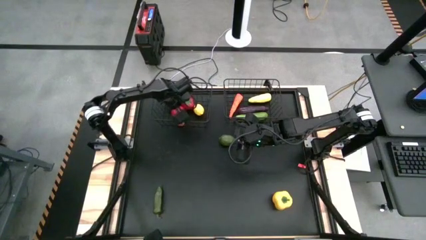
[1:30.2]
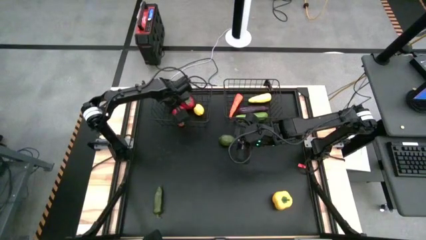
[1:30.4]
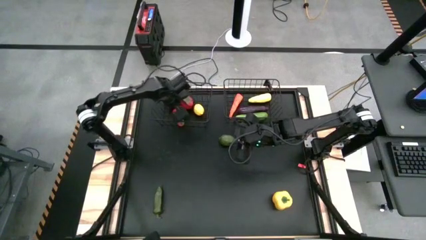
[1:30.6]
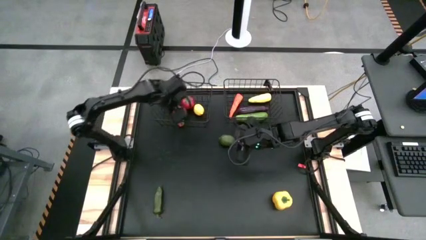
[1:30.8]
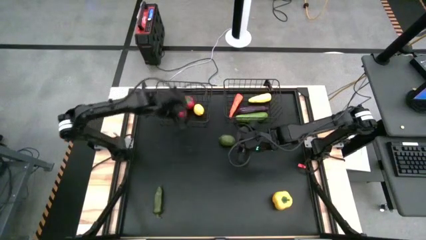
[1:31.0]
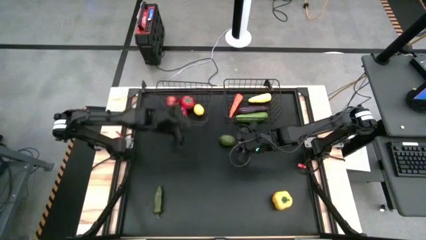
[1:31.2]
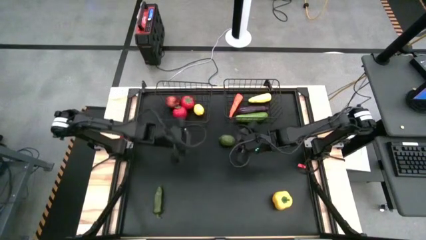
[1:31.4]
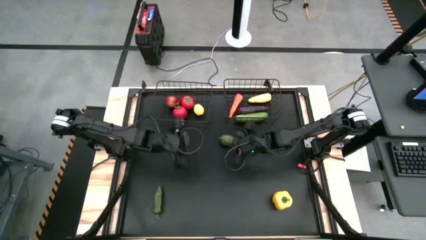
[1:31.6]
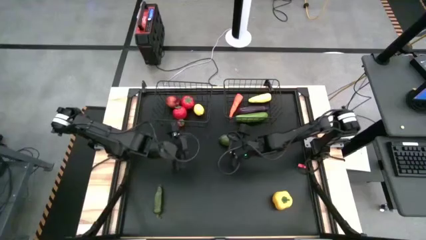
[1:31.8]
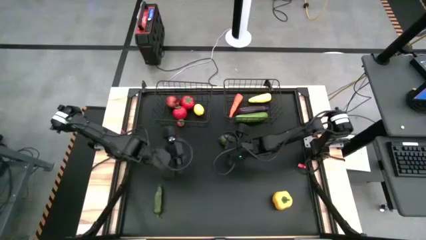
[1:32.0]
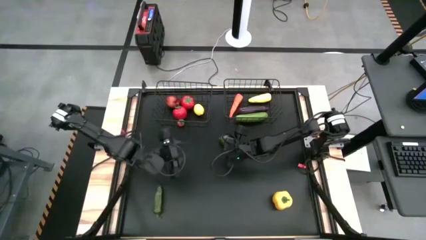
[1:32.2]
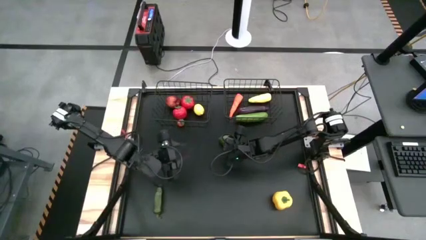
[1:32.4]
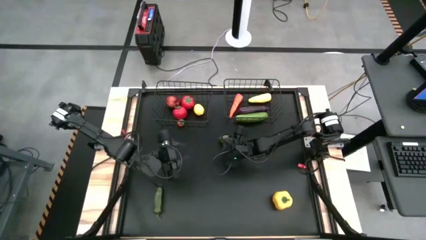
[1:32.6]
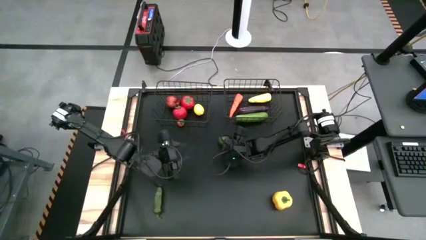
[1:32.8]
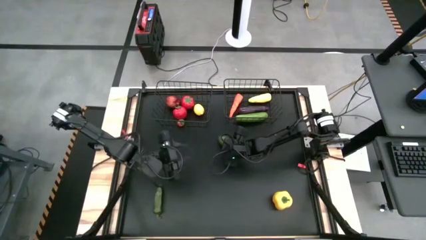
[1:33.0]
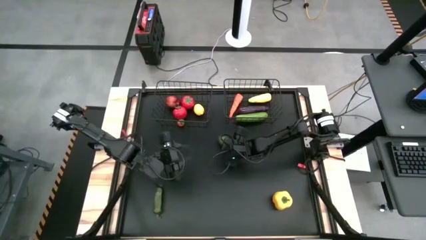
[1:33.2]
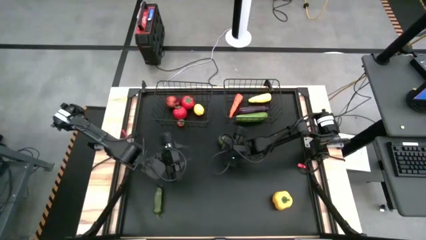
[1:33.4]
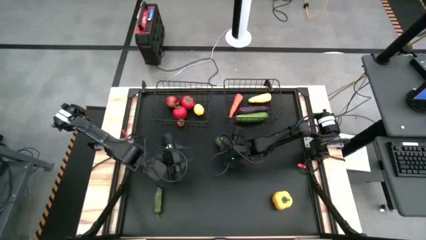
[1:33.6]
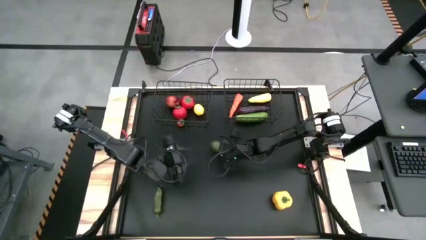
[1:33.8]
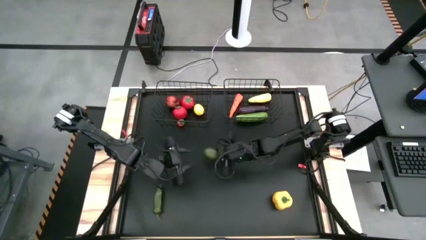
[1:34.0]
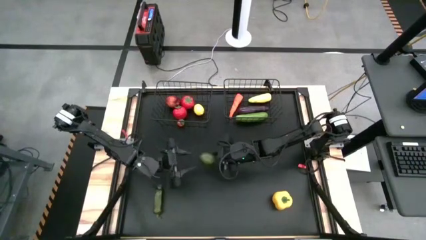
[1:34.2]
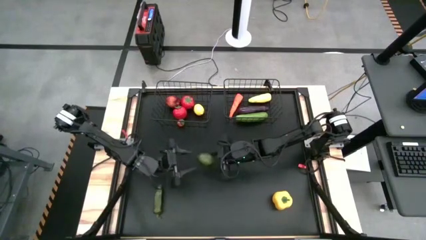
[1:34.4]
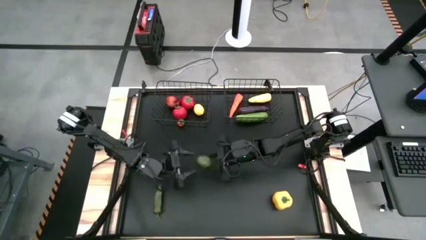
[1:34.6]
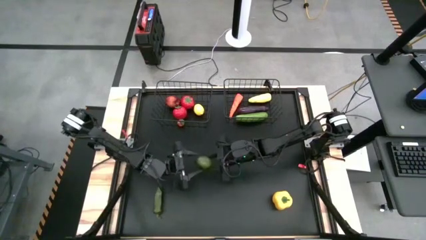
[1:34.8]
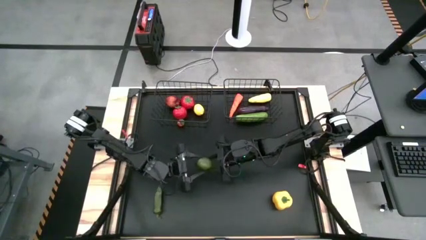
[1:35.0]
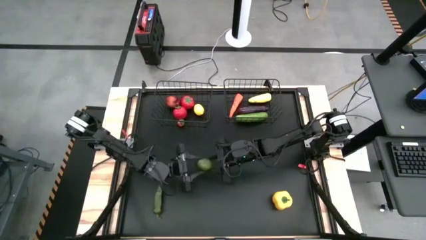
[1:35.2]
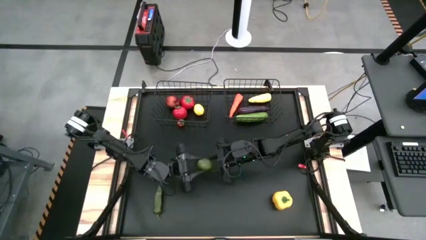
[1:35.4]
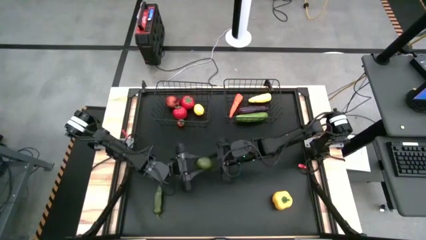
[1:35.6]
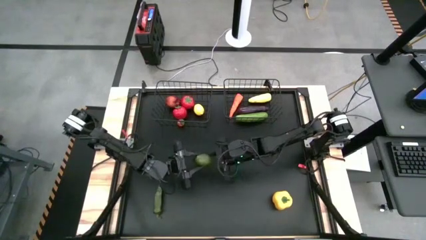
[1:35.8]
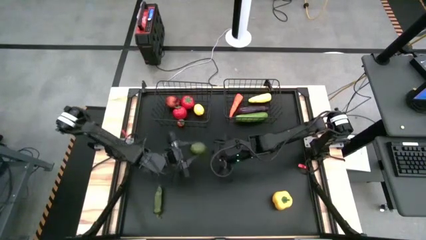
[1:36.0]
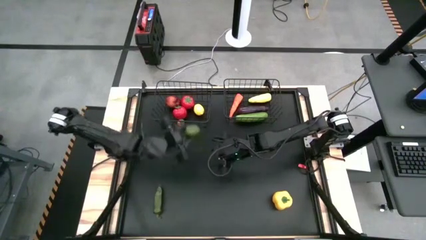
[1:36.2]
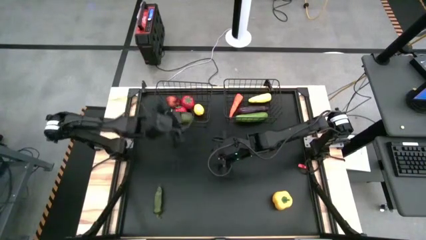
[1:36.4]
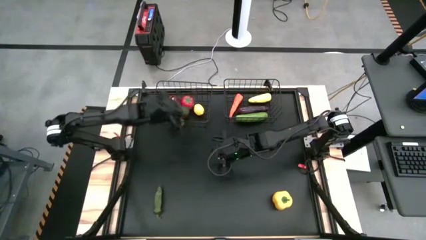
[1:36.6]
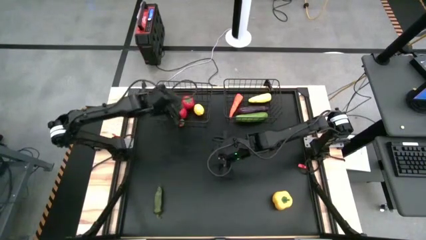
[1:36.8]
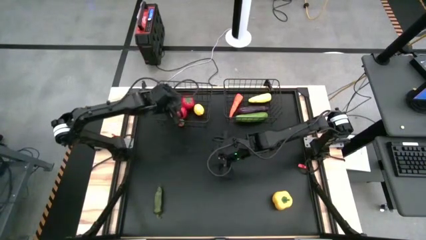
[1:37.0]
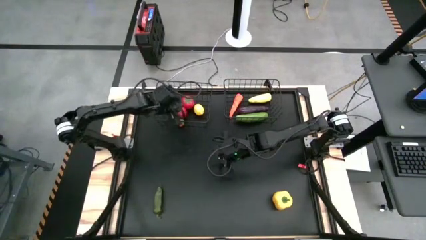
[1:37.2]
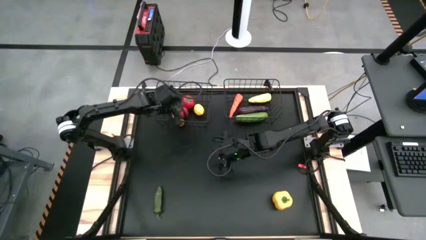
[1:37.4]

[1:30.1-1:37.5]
Task: Sort produce into baskets
Put the lime into the left wire basket

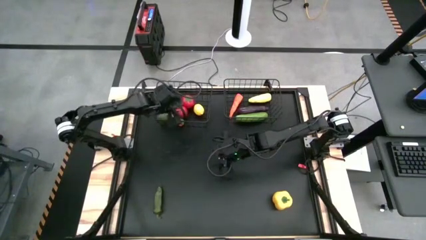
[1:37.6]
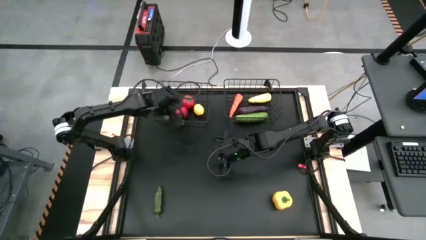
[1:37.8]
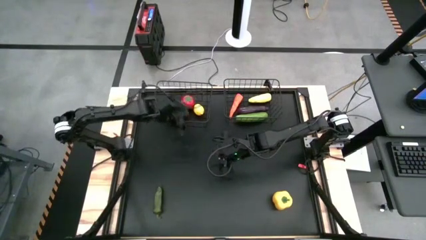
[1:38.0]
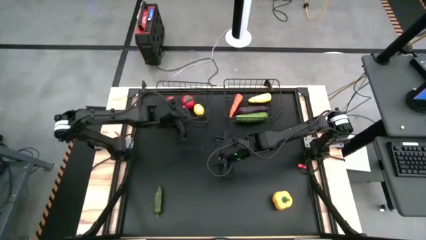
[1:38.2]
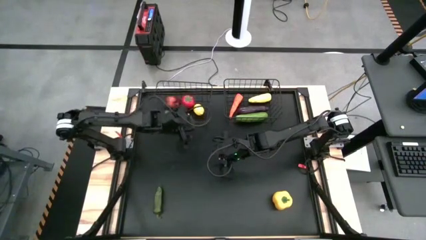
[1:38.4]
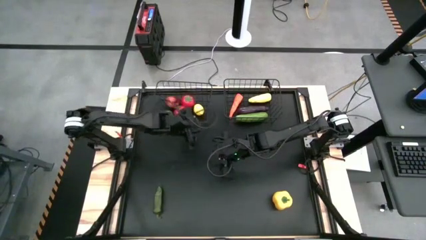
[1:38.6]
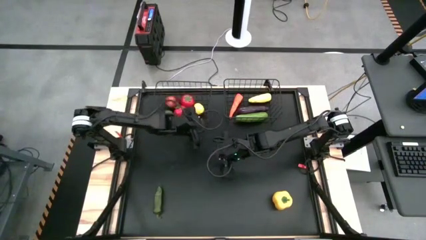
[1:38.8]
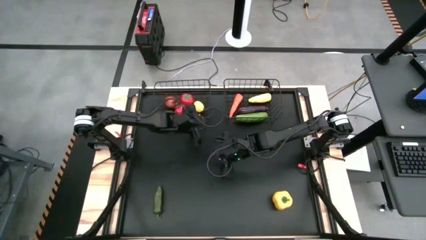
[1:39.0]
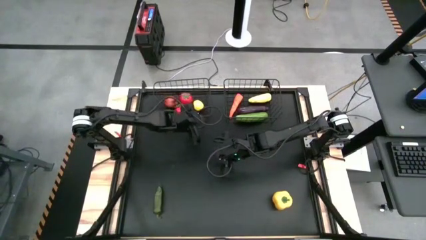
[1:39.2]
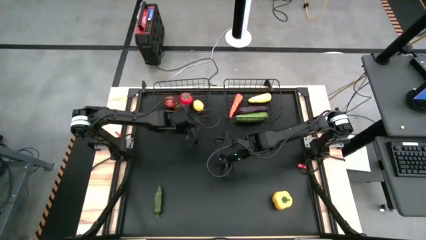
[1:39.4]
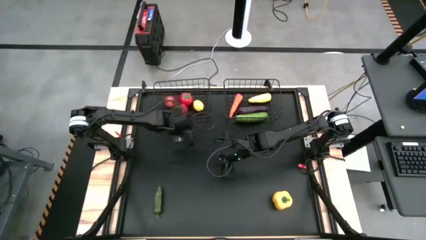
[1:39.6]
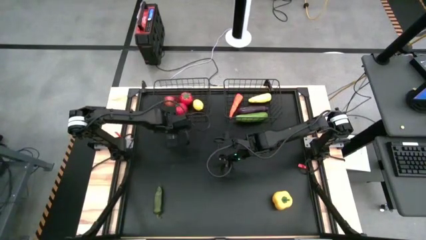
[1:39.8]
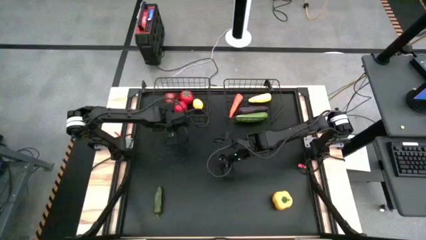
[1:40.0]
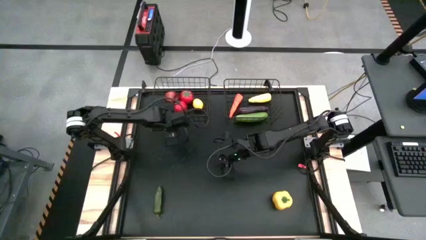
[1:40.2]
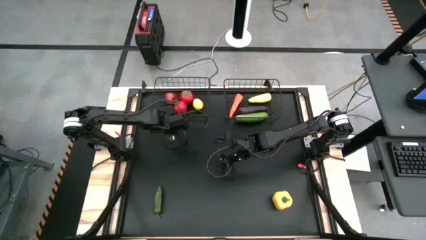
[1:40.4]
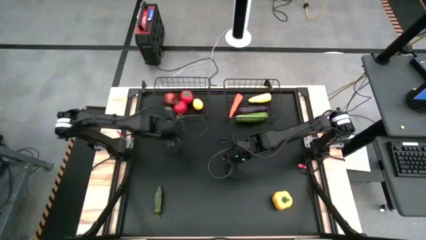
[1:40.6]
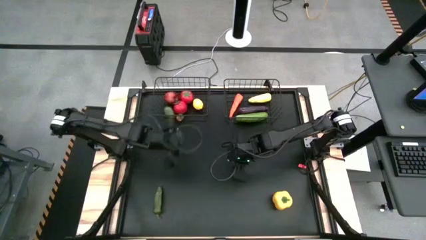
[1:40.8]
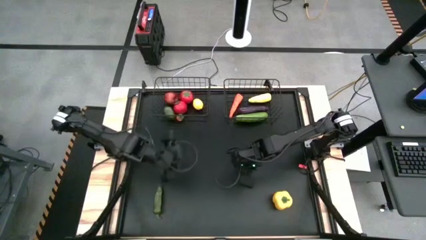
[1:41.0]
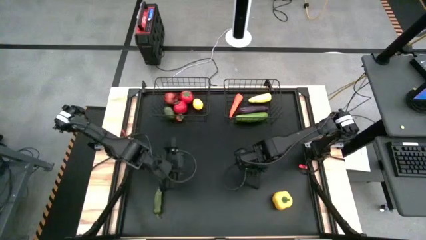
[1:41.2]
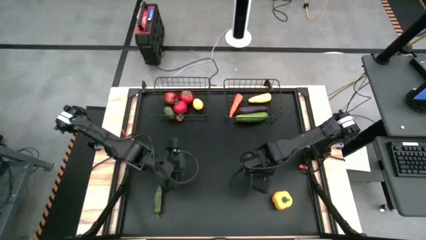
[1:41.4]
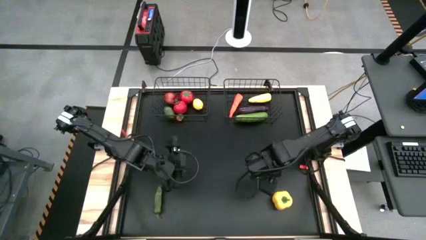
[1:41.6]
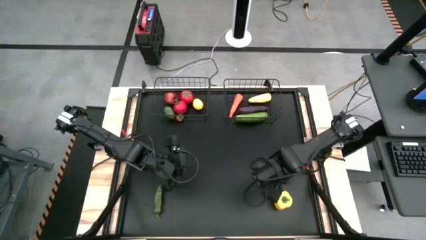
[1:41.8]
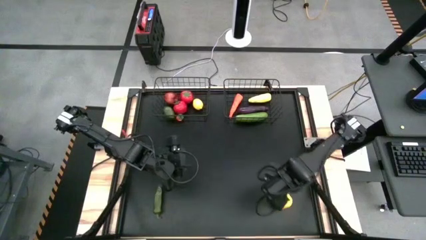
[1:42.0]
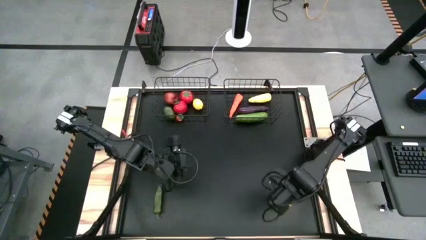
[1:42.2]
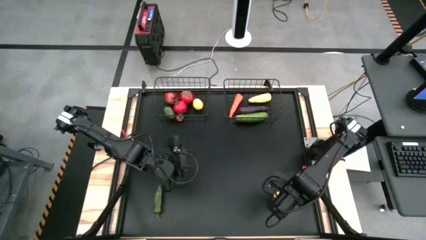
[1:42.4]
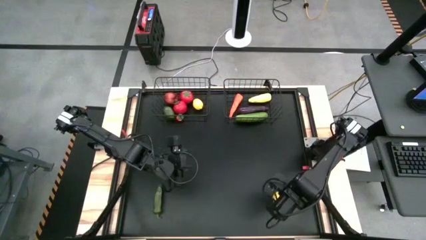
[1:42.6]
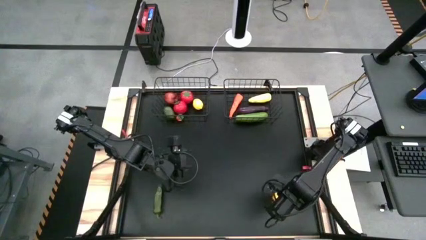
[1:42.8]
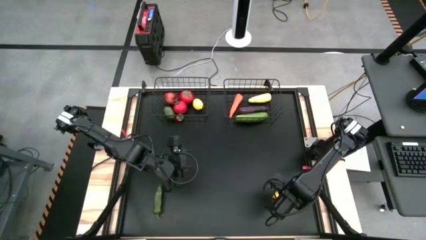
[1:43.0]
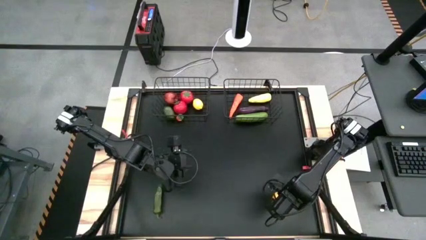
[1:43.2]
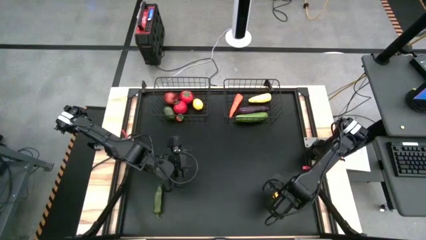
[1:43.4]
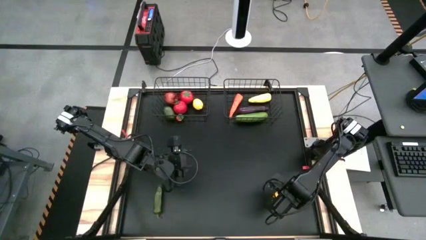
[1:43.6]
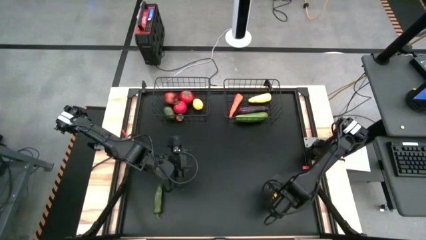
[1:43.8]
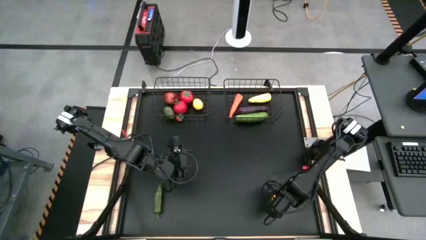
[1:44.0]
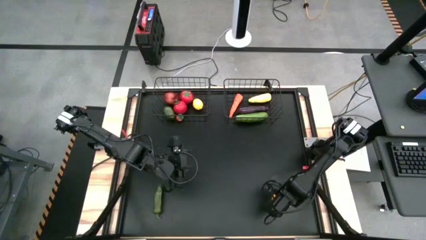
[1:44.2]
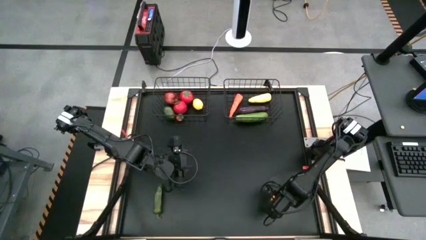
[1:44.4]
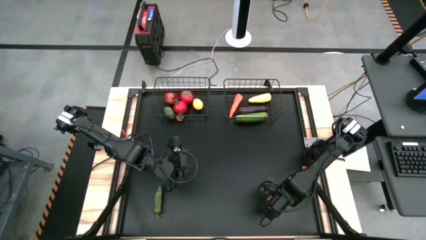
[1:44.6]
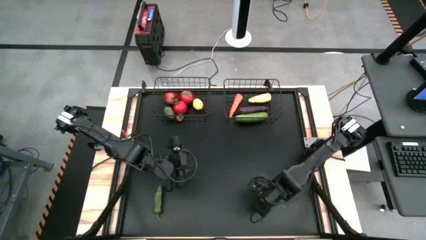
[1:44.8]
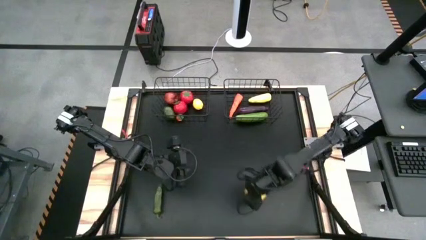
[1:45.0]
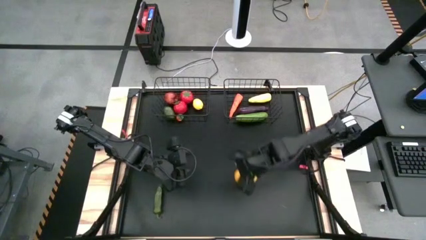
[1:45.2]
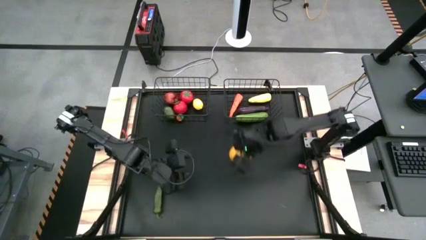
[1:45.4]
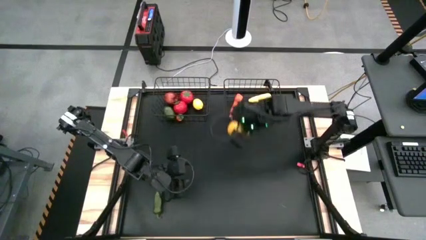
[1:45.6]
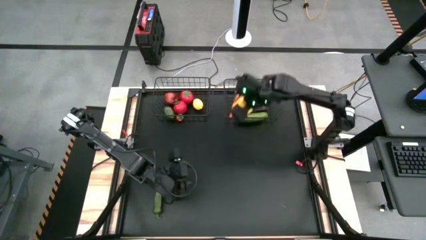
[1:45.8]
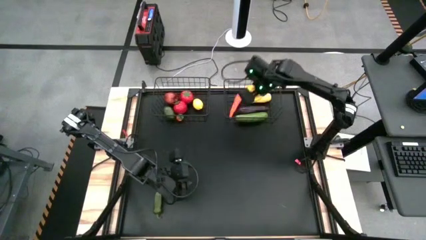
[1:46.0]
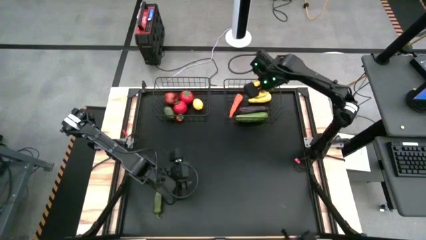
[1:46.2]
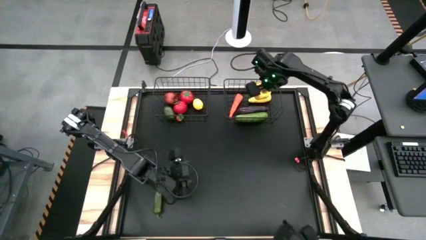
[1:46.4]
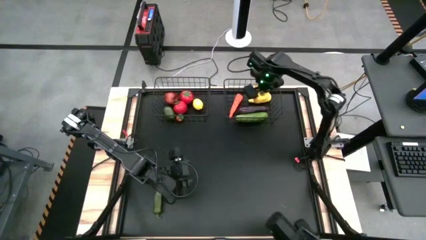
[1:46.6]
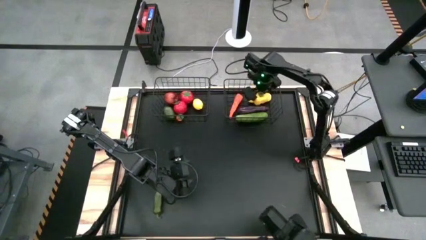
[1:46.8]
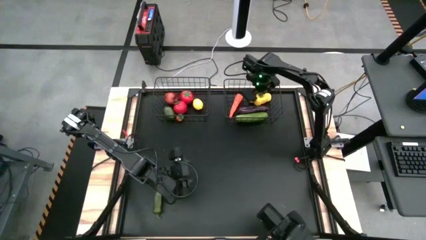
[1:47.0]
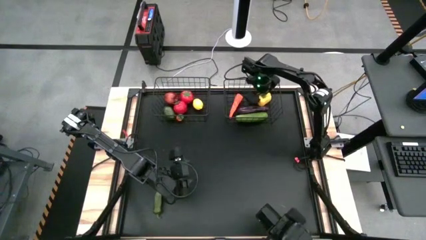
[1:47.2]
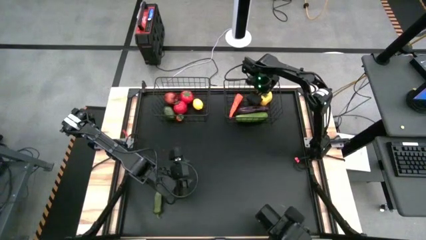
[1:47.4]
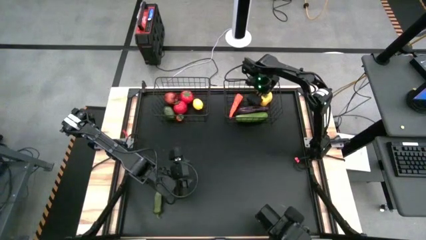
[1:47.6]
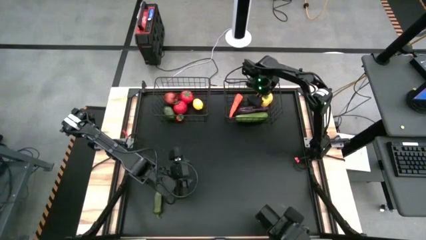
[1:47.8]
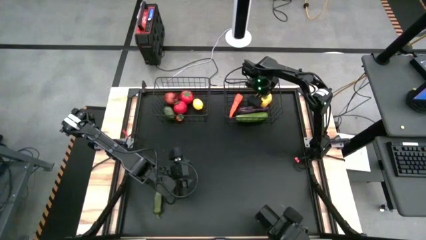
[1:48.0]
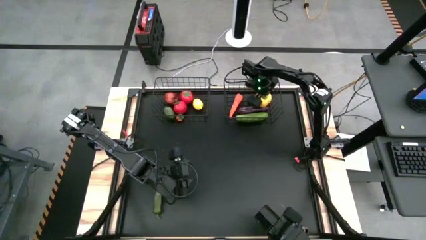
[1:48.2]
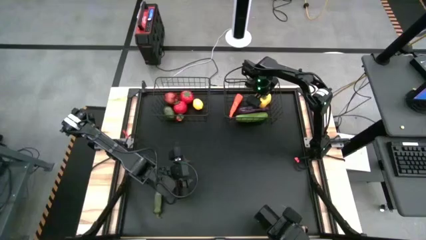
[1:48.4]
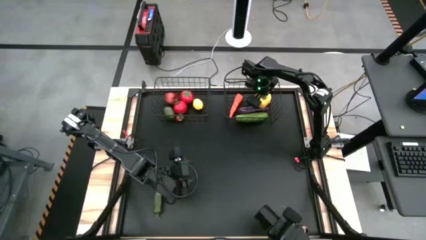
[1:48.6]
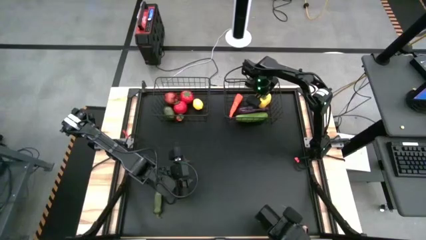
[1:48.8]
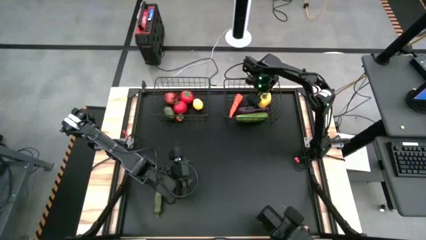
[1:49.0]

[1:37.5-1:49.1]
Put the bell pepper into the right wire basket
